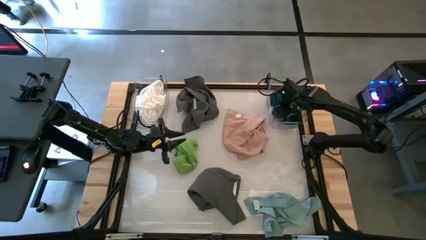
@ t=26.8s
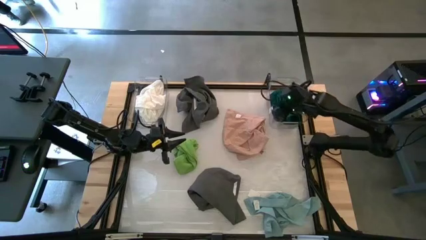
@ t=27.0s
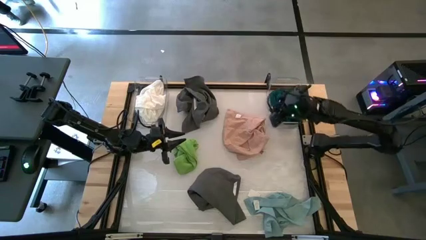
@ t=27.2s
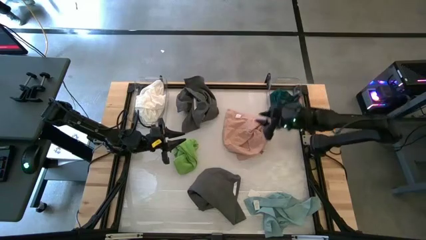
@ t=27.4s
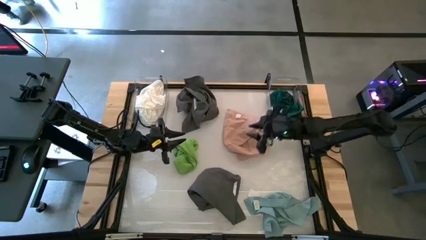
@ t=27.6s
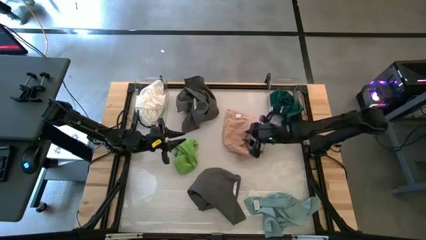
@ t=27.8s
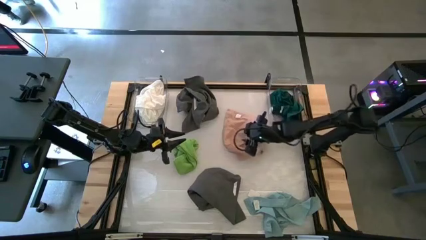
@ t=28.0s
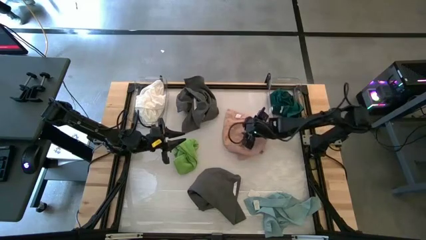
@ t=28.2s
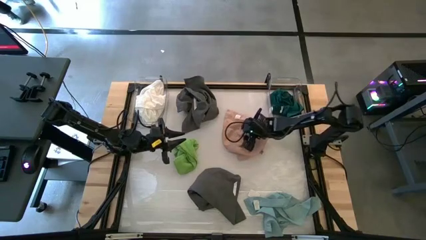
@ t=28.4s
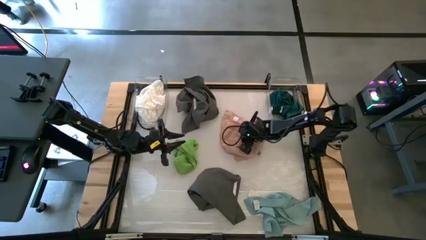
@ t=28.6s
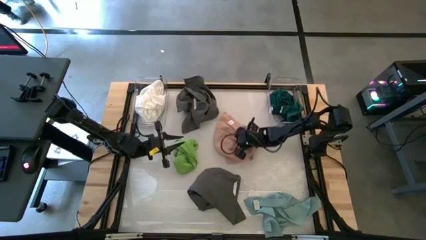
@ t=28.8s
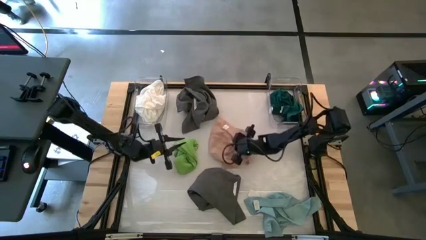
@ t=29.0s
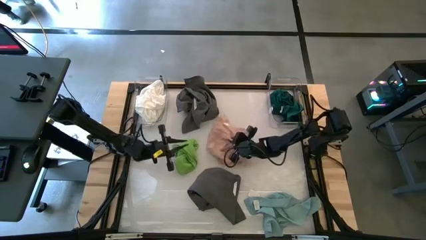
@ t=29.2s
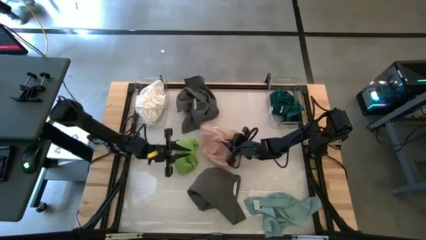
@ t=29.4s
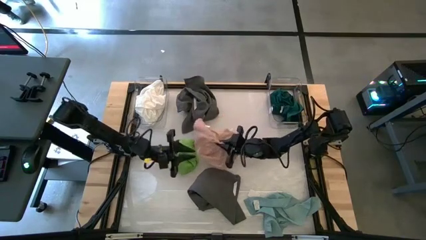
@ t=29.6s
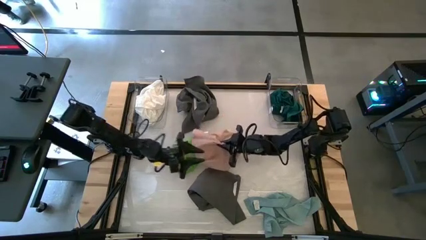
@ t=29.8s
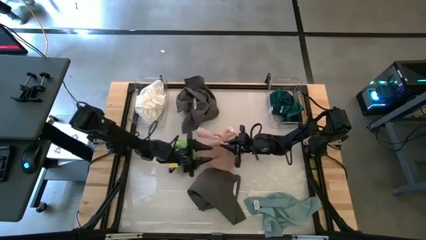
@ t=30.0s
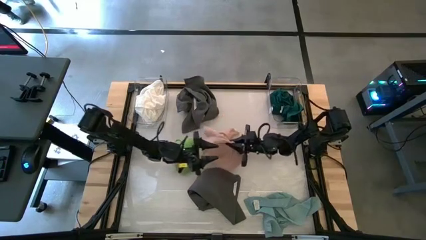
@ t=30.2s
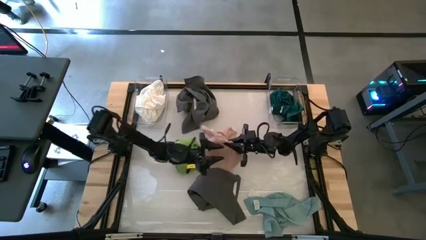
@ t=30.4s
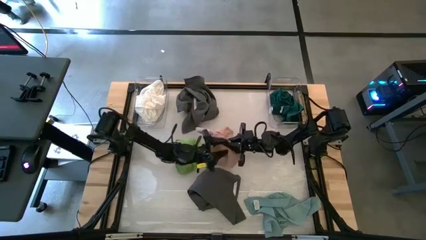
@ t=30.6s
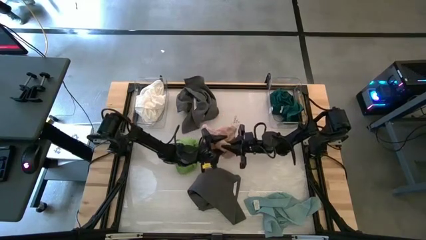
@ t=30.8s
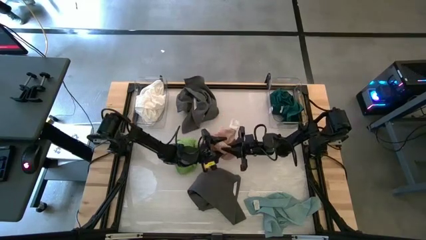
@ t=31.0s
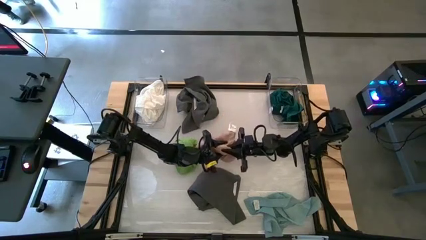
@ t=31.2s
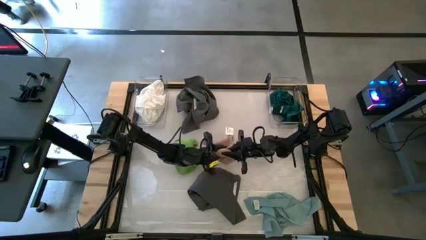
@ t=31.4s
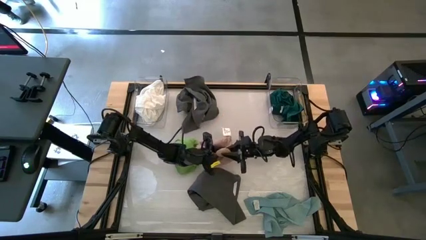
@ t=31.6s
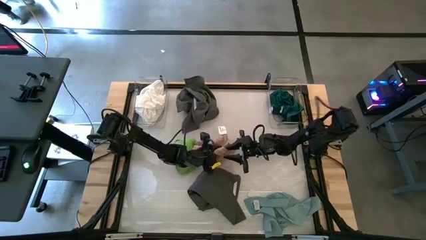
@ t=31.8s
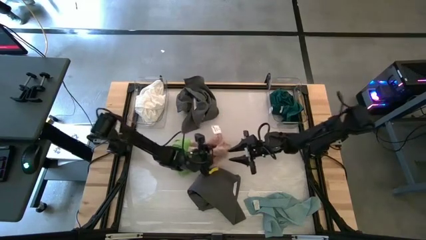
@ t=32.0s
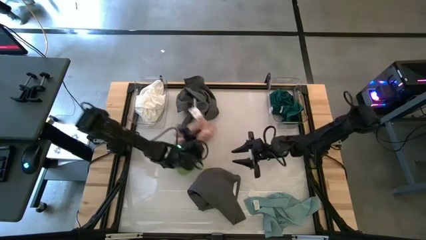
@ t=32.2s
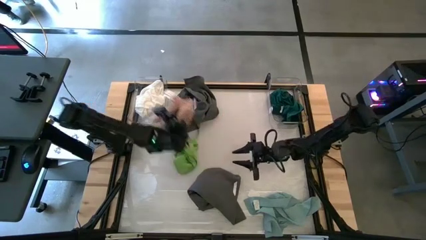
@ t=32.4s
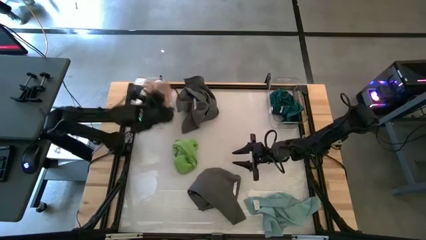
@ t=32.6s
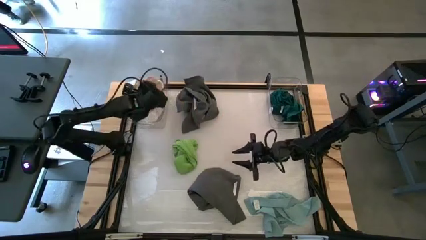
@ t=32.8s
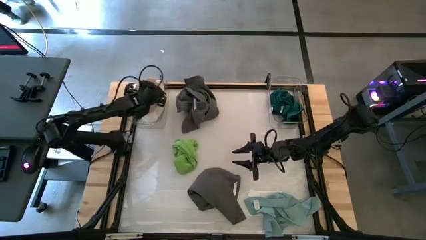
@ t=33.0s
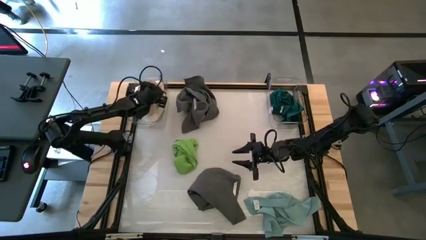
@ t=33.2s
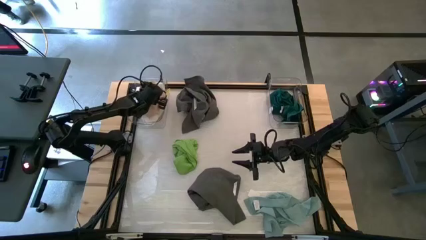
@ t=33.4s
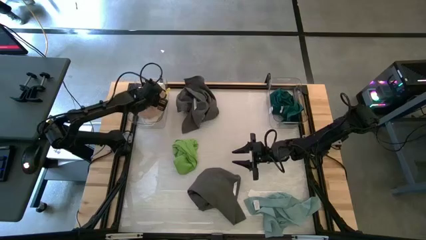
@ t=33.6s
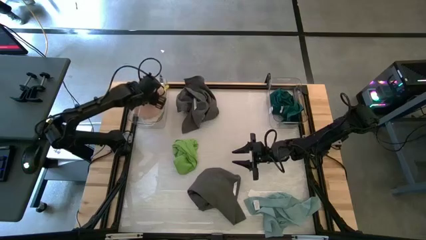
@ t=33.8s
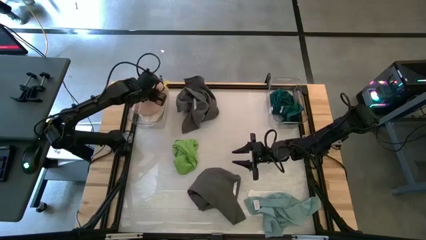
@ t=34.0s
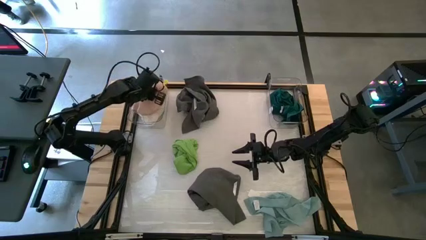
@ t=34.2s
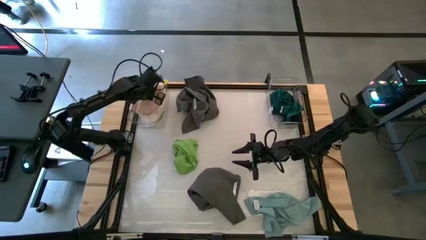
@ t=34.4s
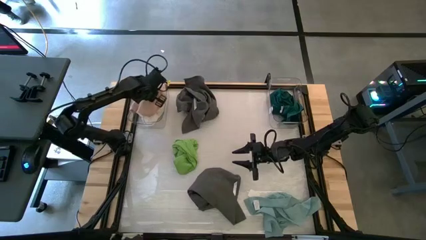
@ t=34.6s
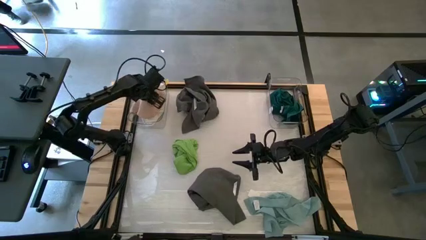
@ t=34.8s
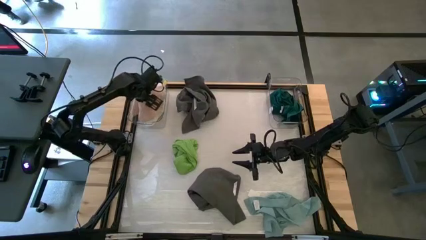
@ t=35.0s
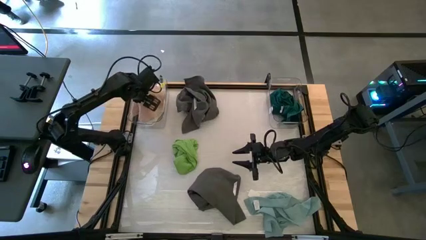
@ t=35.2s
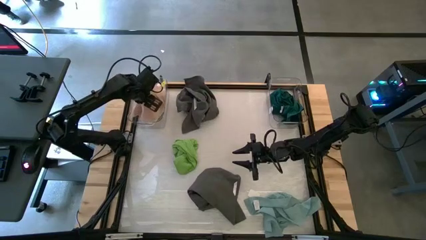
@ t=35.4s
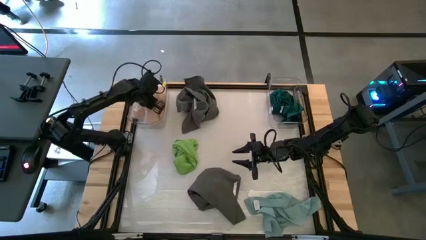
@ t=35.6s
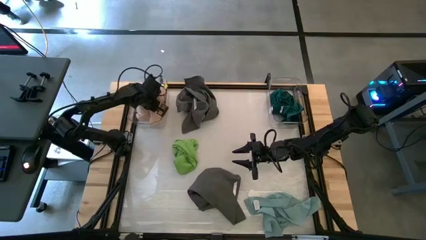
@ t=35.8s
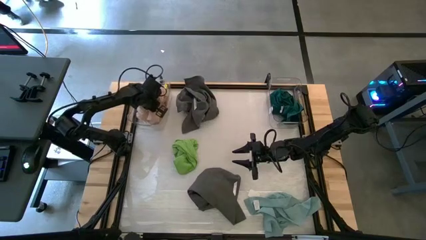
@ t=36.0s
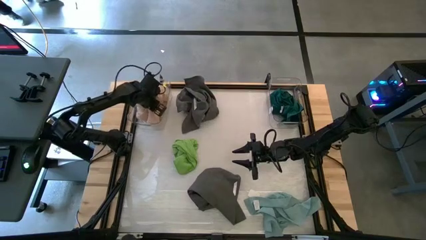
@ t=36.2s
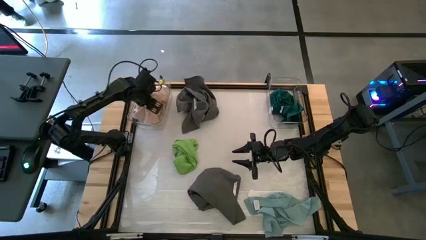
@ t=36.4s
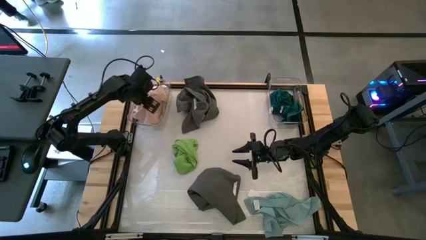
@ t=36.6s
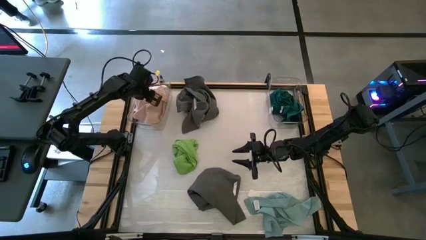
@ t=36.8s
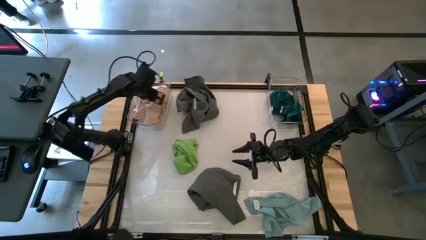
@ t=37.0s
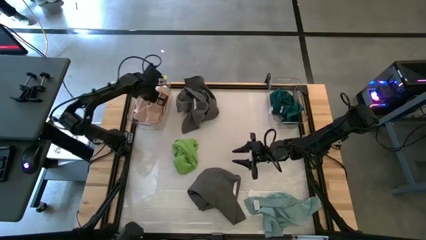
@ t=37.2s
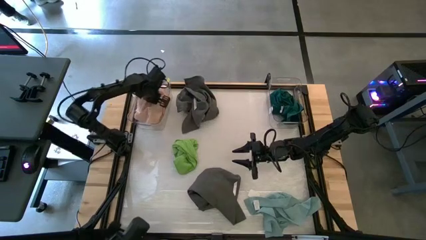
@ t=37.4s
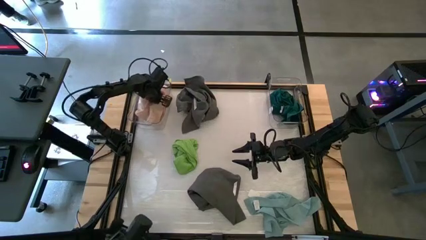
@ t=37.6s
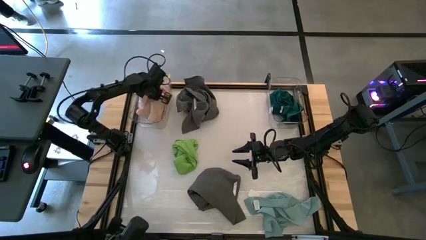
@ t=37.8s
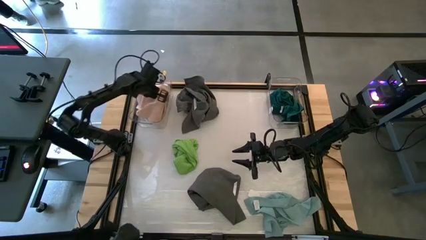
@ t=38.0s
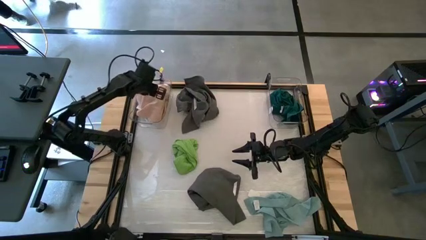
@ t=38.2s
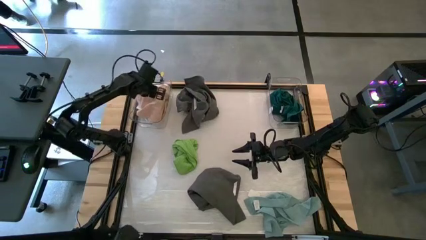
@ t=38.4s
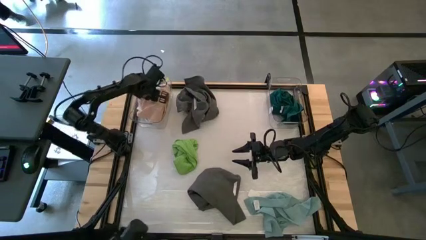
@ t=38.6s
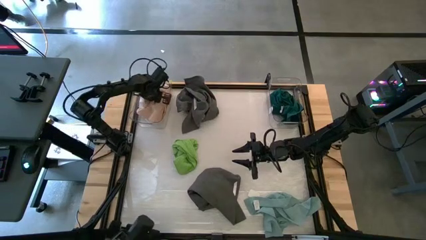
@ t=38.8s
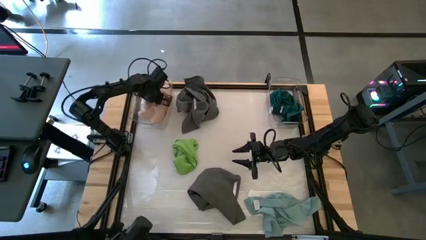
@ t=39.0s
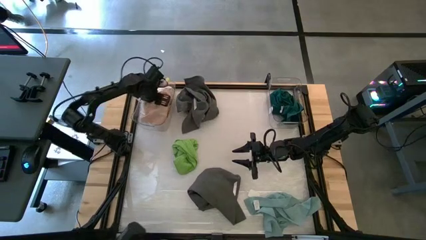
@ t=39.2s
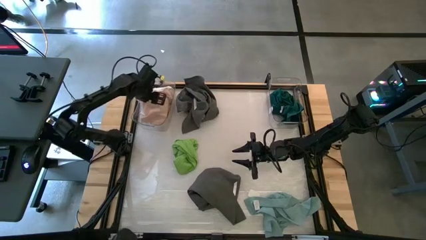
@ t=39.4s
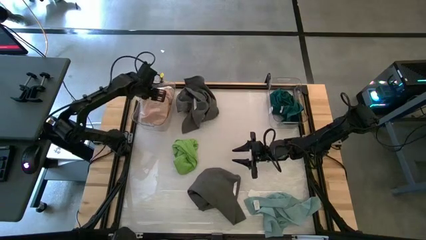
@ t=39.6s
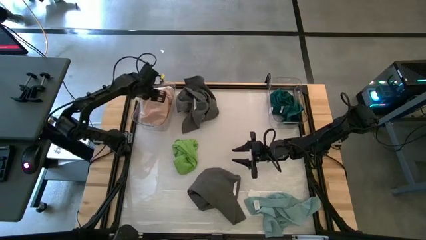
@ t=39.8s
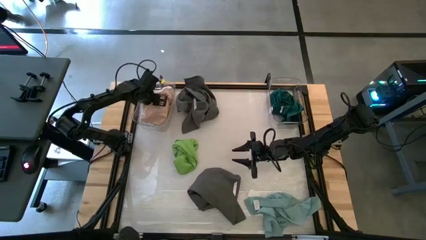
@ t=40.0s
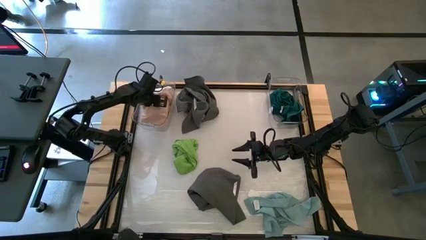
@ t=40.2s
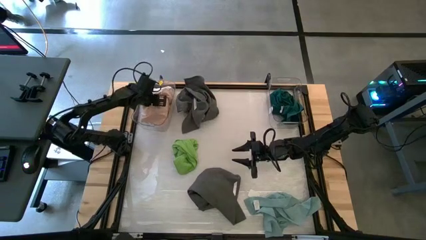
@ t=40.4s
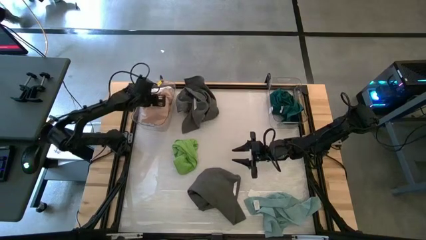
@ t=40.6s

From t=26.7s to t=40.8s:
Task: Sort towels by color in basket
Put the pink towel into the left transparent bin

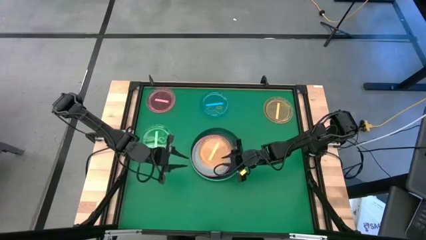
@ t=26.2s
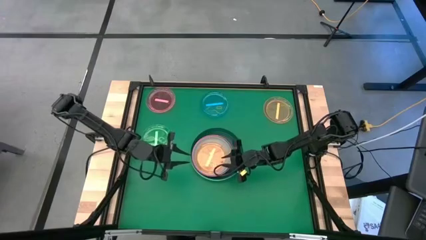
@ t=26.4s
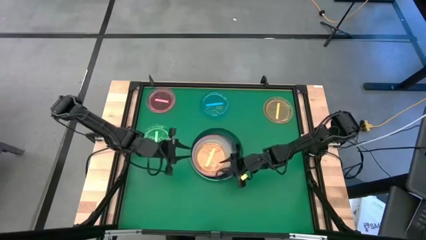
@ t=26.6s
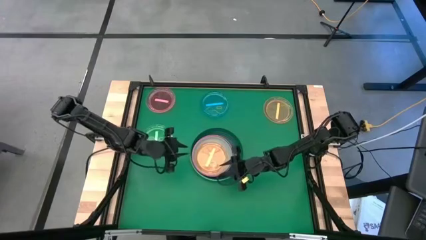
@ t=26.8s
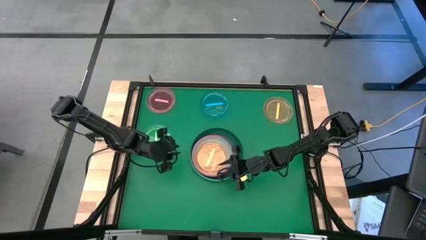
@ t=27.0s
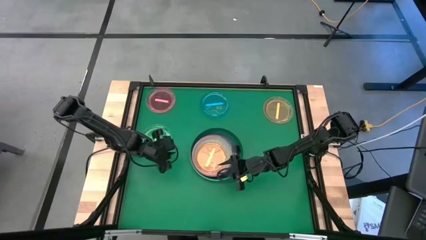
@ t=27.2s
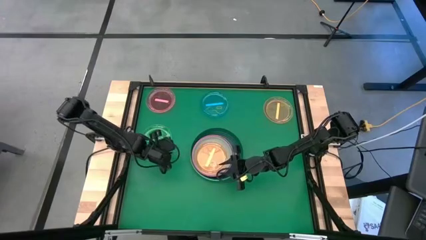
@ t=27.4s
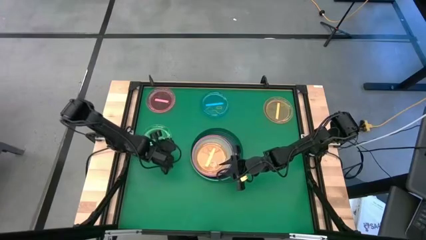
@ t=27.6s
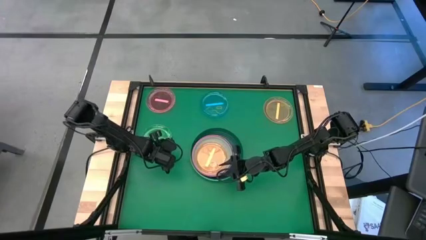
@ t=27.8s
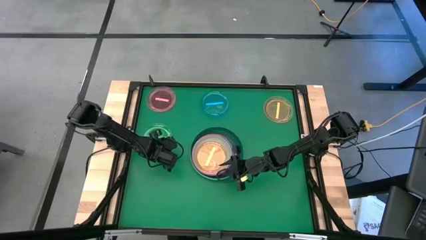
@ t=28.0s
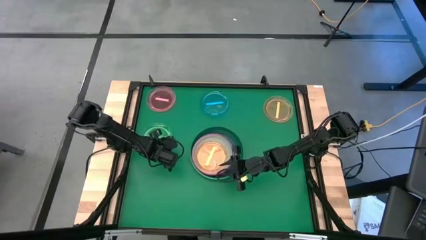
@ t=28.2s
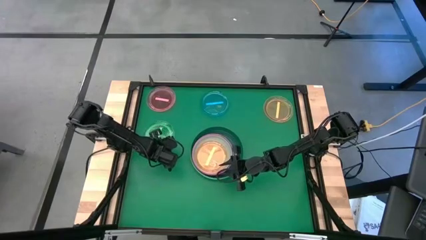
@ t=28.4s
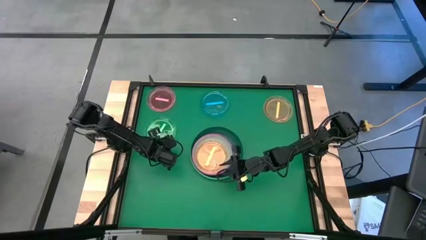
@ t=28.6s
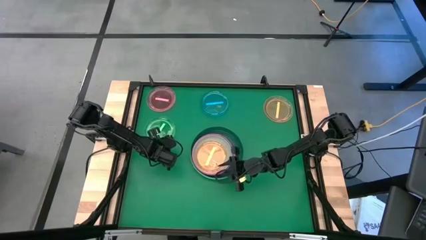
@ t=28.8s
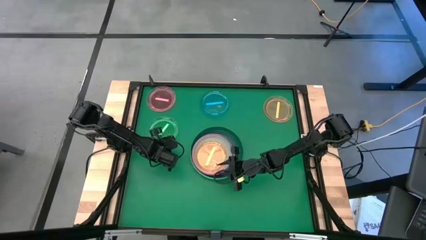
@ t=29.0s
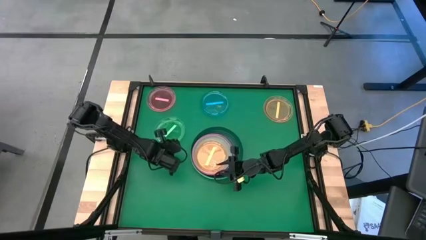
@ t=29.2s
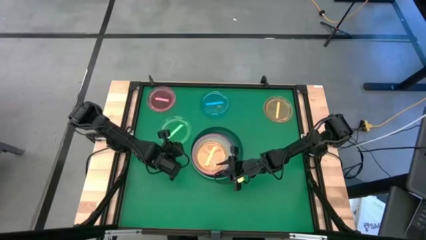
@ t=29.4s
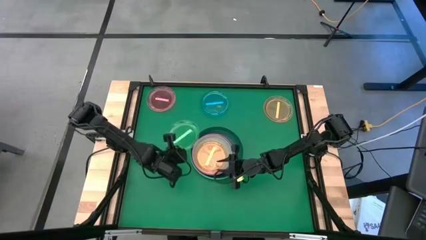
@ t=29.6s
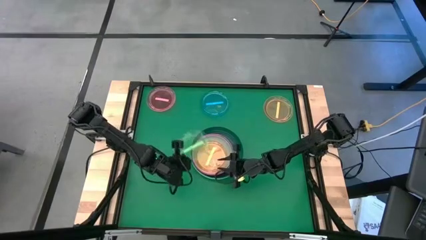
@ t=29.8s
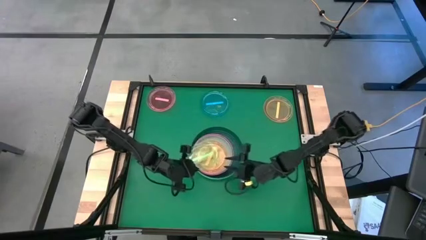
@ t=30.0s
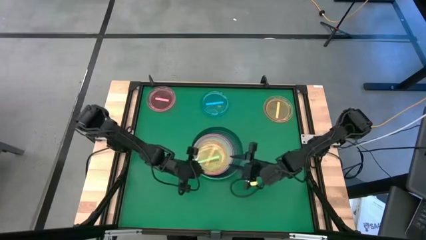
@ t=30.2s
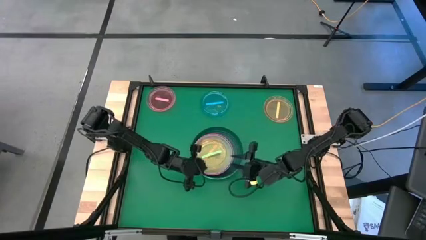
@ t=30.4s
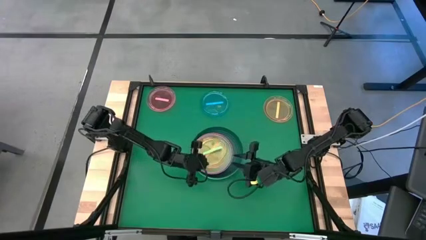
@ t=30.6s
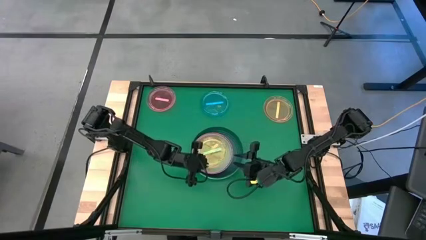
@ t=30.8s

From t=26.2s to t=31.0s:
Task: Stack plastic plates
Stack the light green plate on top of the orange plate
